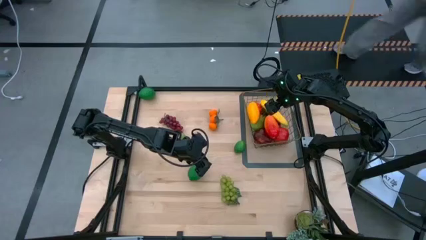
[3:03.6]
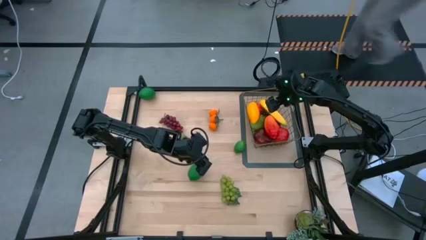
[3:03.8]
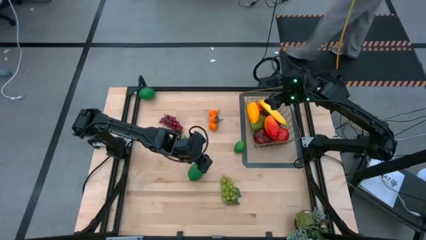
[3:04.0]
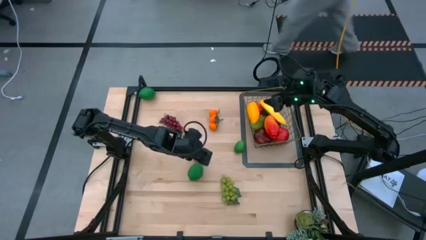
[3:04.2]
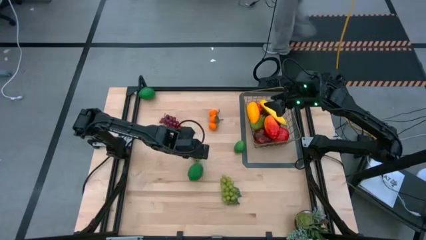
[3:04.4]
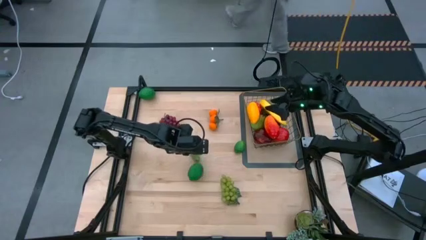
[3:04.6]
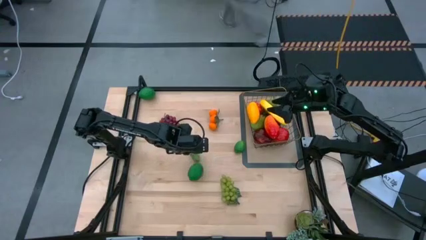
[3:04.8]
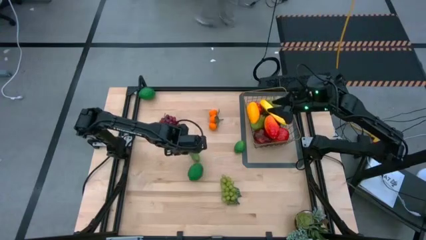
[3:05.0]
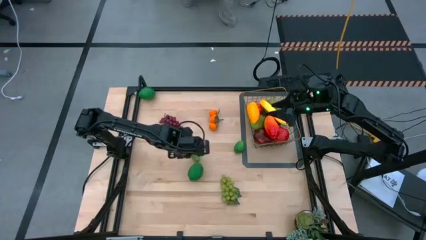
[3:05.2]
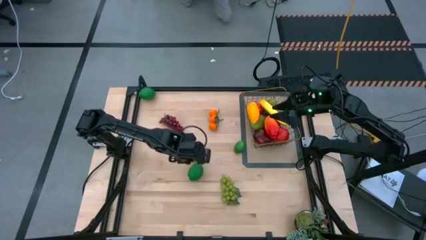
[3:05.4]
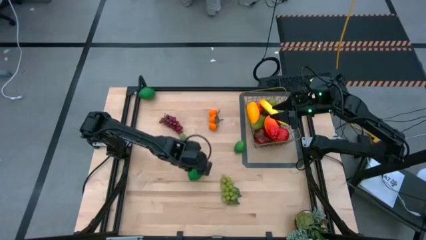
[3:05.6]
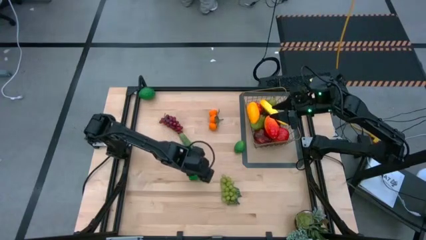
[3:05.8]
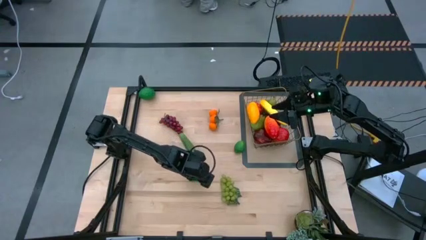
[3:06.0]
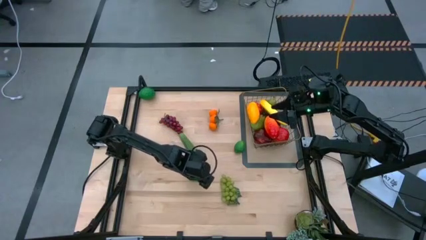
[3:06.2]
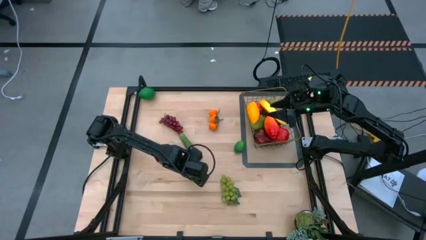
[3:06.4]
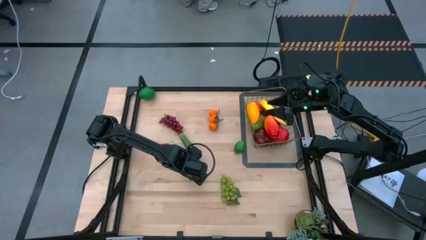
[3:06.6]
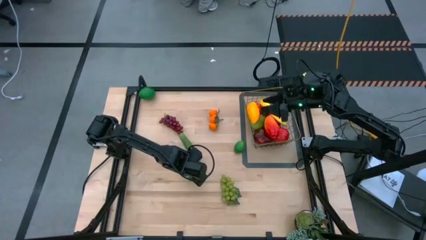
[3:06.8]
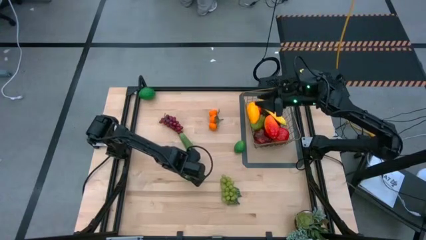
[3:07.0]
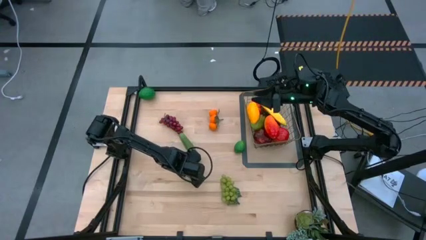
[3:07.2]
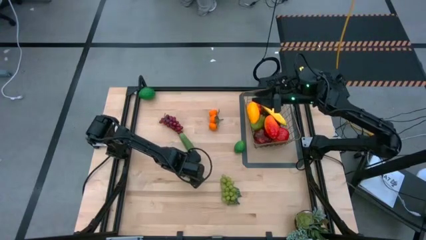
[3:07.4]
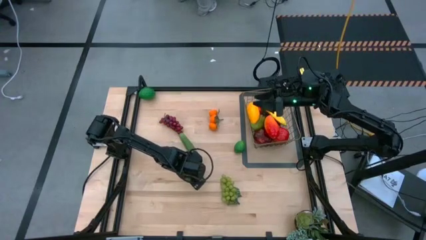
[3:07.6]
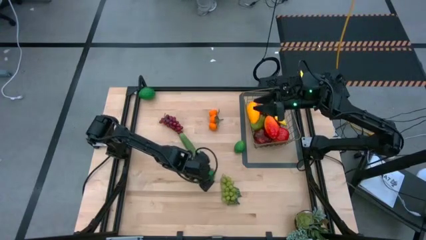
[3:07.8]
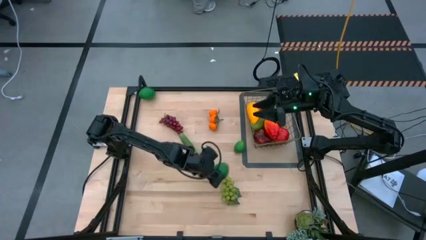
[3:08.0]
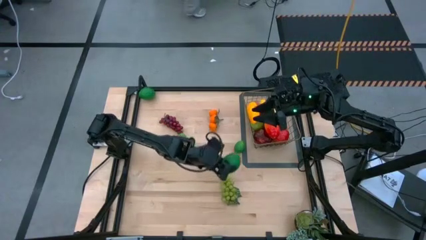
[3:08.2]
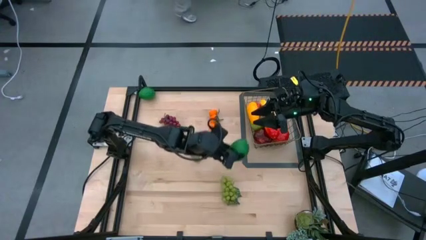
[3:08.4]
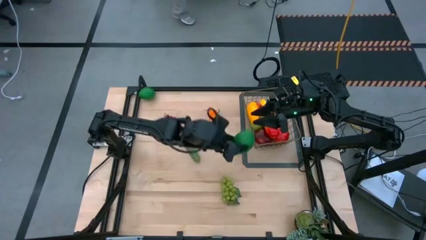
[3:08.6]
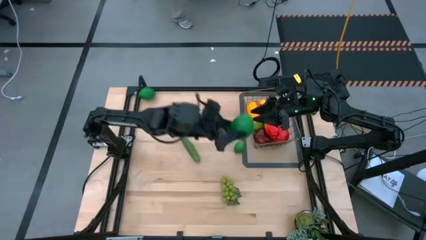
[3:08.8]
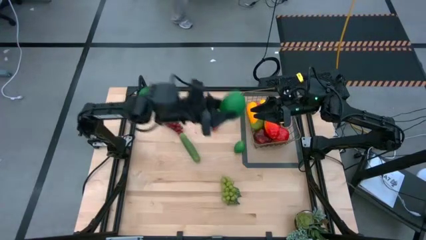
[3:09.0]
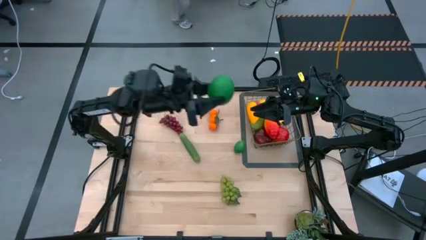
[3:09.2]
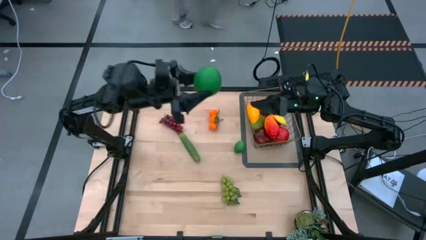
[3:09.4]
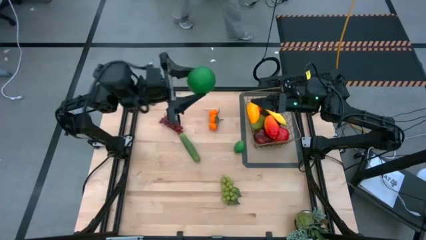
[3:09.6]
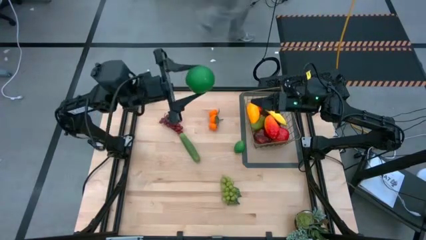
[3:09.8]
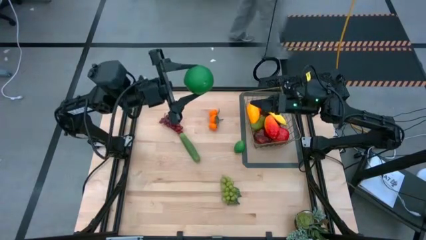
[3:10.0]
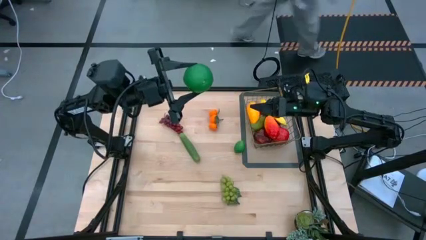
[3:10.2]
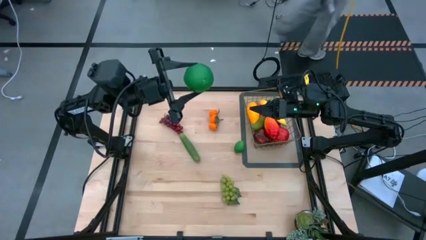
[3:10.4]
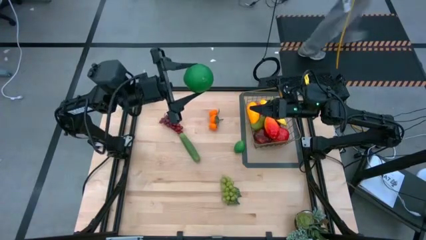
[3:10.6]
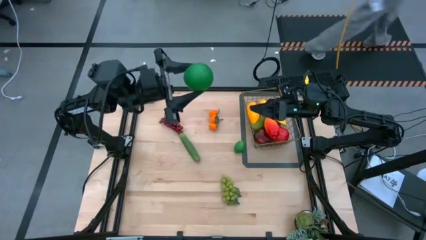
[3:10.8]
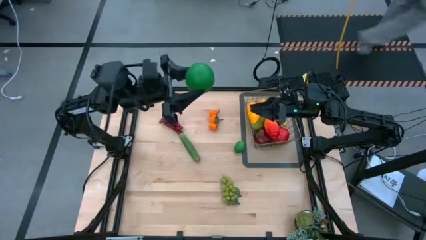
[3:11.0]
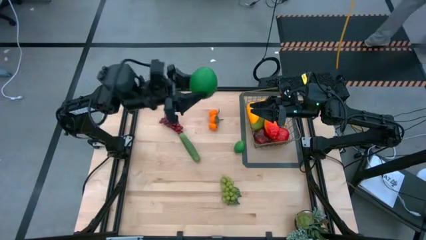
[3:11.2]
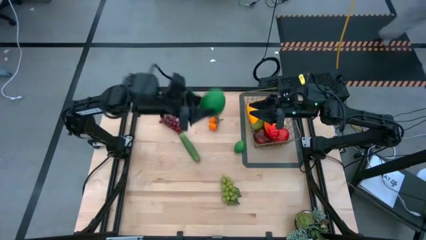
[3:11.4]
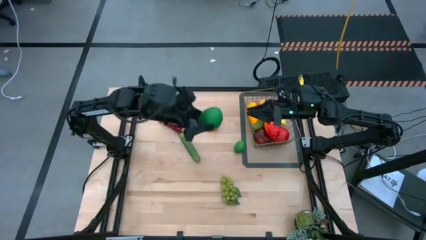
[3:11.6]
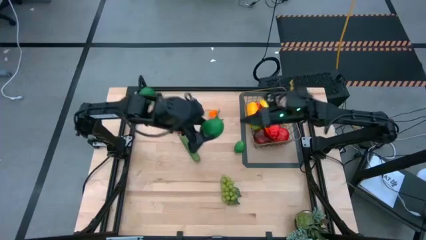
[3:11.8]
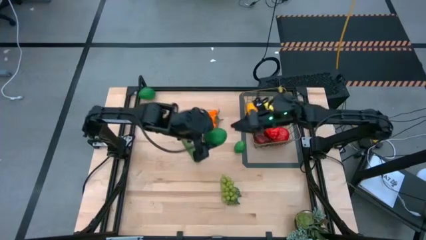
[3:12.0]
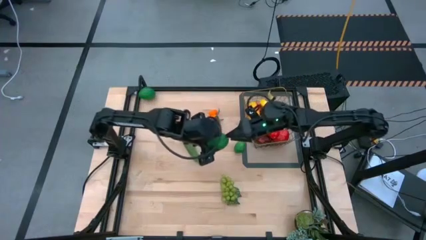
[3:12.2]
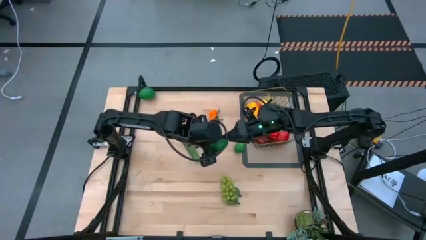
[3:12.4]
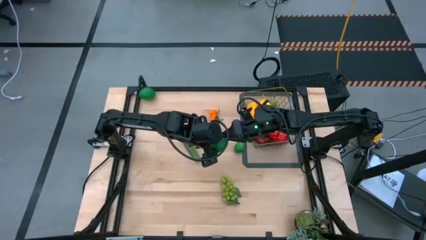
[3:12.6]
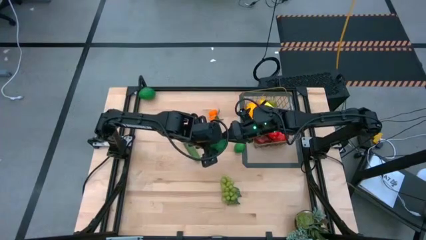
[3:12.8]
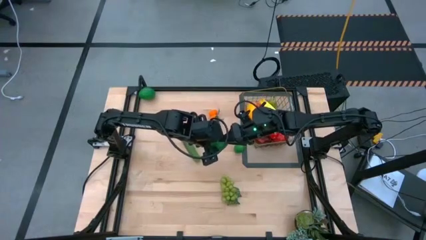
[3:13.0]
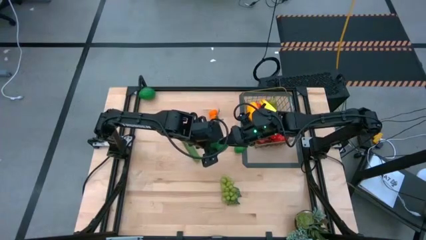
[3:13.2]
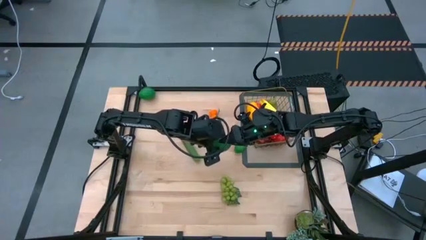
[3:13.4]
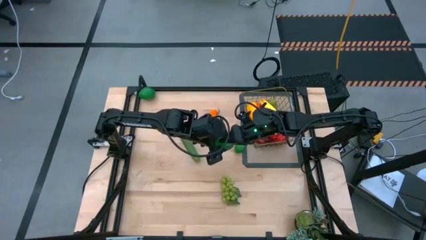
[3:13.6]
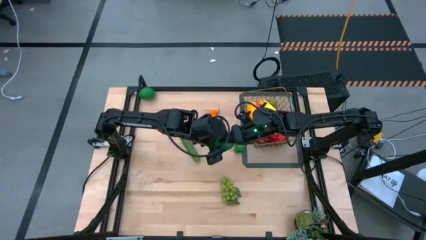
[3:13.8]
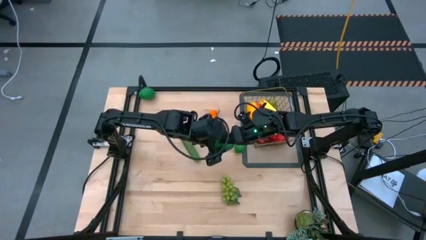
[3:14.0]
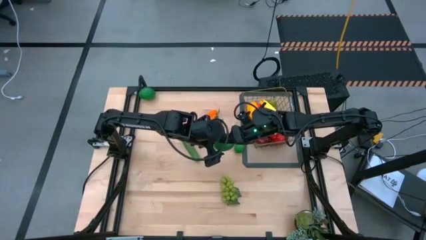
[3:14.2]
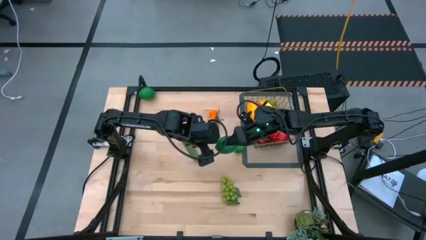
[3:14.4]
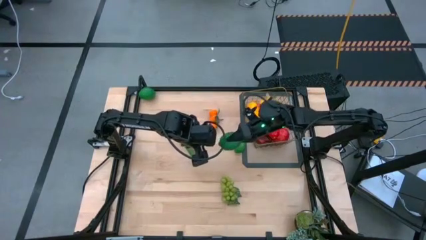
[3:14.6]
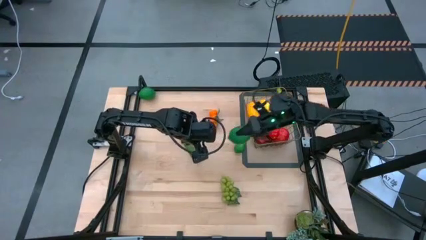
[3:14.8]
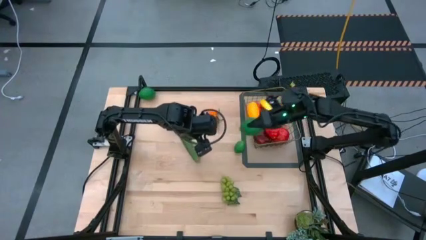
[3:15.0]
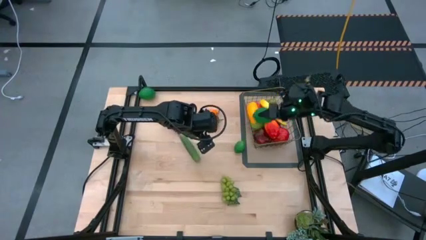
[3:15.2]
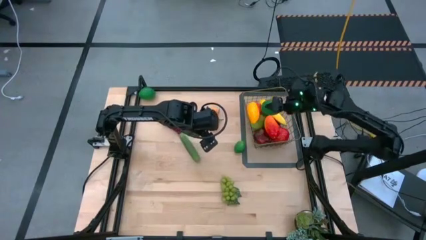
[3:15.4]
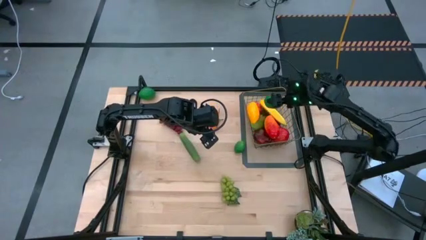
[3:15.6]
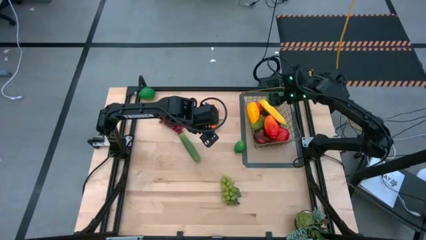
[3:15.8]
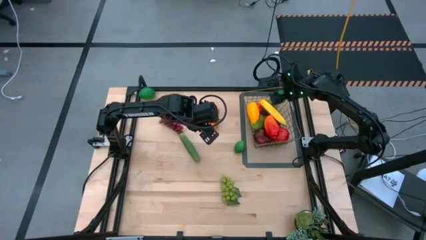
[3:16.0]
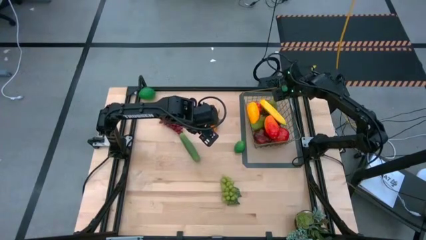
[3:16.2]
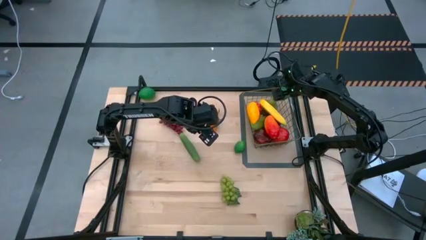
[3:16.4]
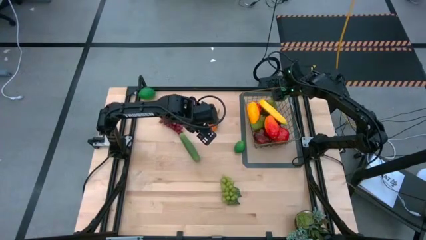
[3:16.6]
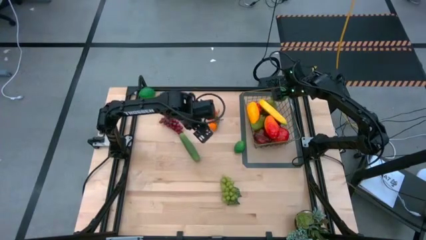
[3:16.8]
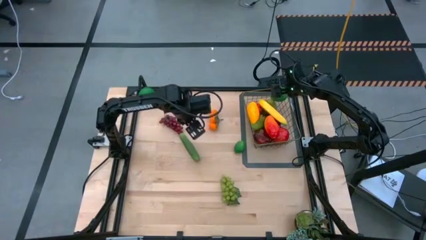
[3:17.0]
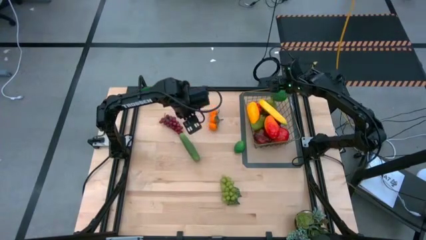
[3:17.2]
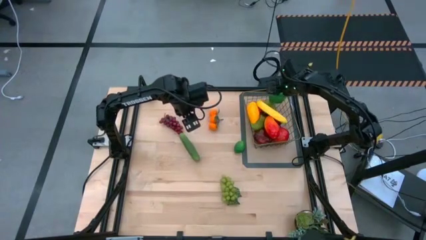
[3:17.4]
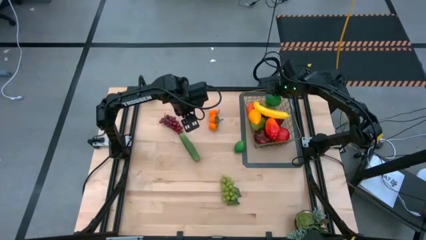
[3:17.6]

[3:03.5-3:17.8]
Task: Build produce basket
Put the bottom green lime into the wire basket

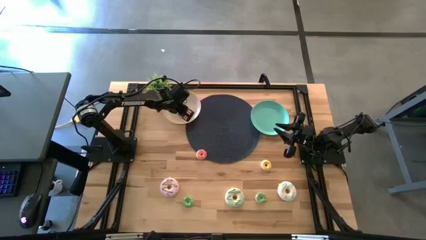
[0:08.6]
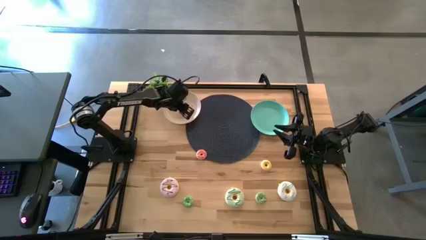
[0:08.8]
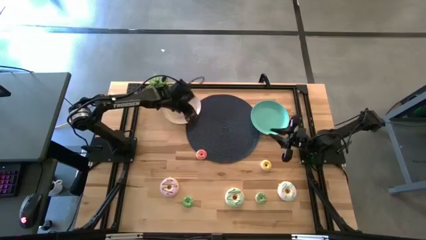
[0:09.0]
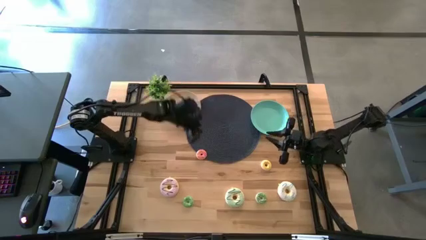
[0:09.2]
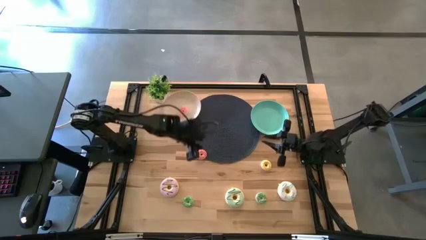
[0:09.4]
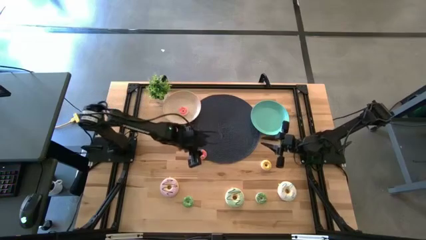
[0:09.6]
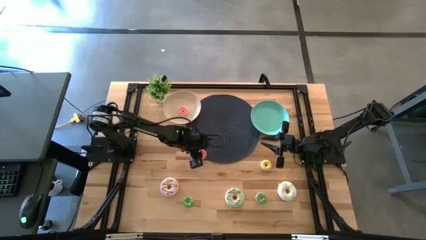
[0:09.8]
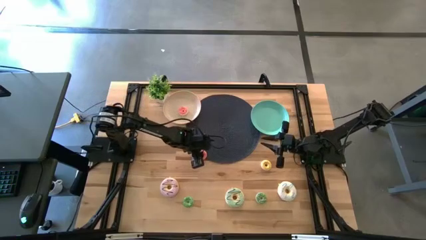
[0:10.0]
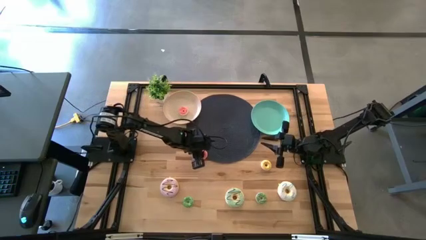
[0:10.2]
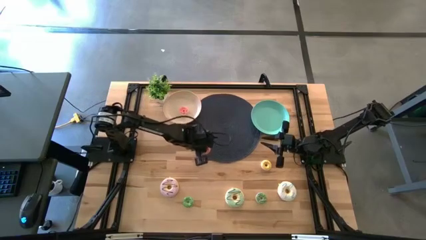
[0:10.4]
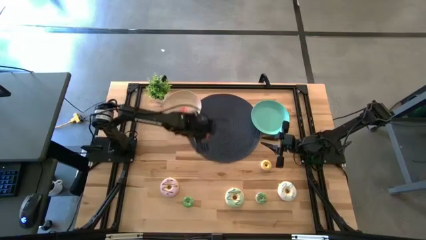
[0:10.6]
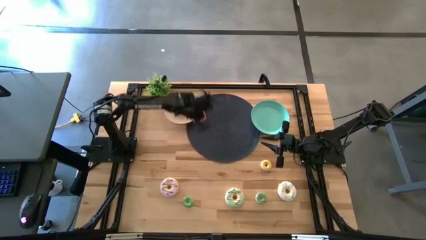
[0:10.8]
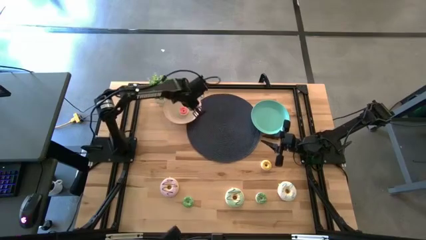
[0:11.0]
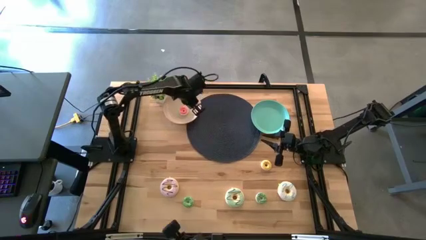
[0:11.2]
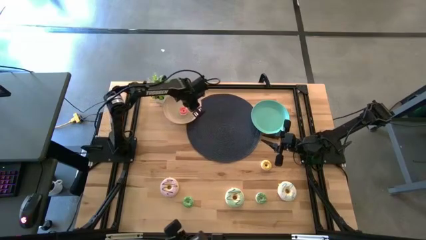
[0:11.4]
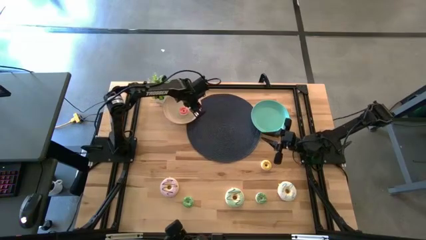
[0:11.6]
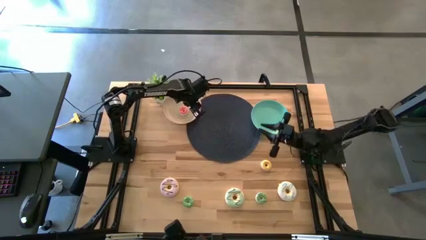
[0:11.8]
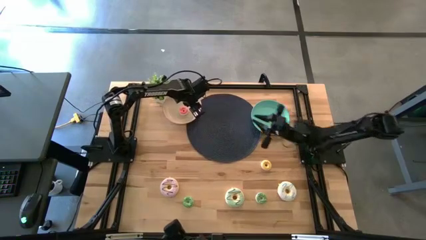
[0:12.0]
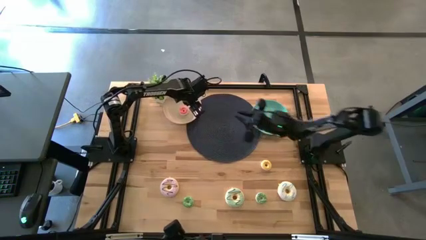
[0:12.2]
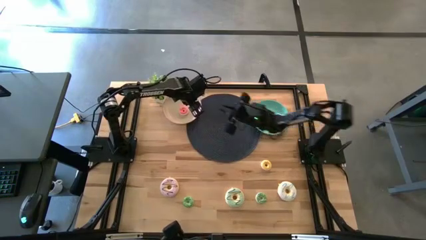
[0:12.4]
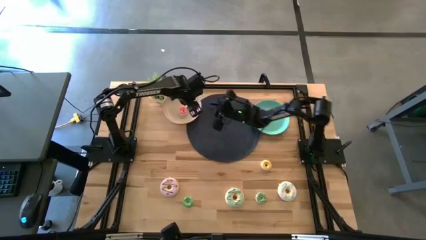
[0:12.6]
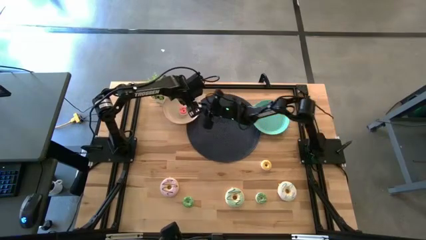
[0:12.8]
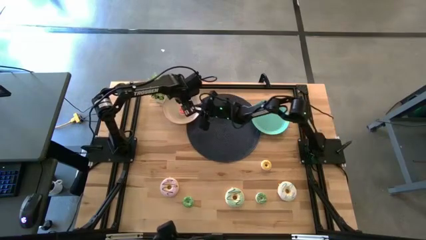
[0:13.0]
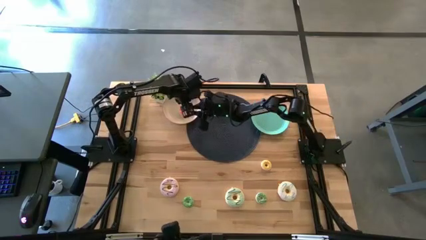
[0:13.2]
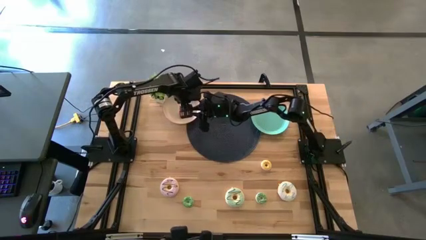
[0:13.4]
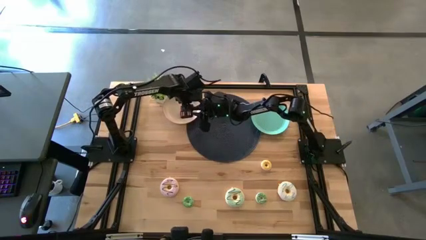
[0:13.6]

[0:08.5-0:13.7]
Task: Pick & Place donuts
Put the small pink donut on the white plate
